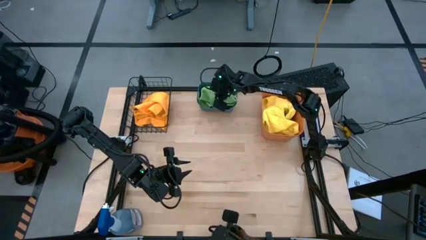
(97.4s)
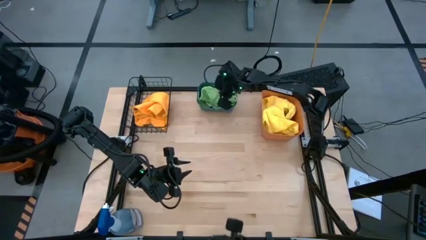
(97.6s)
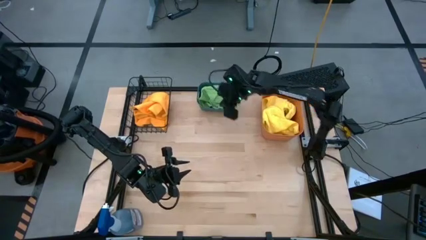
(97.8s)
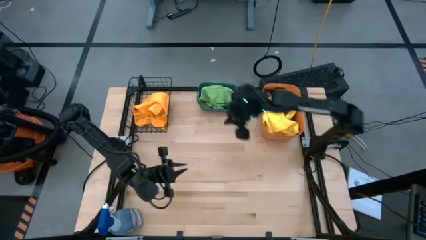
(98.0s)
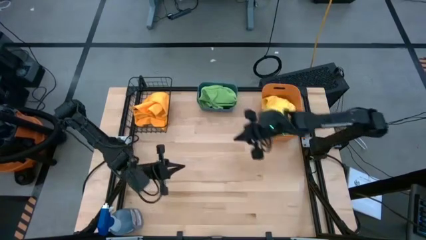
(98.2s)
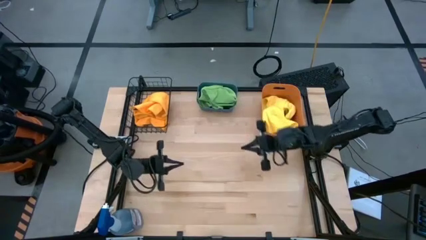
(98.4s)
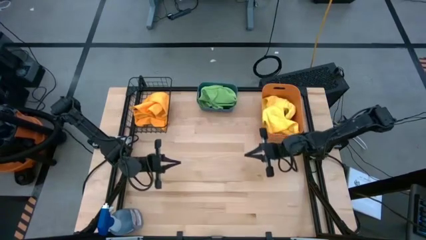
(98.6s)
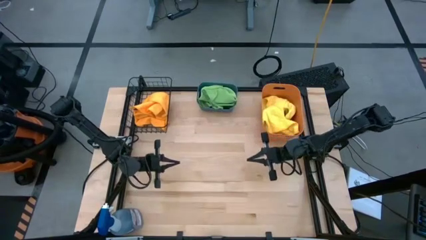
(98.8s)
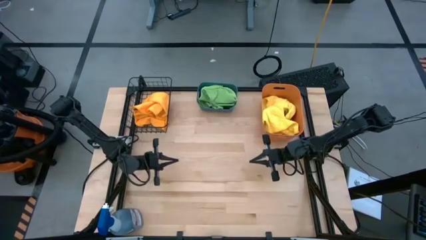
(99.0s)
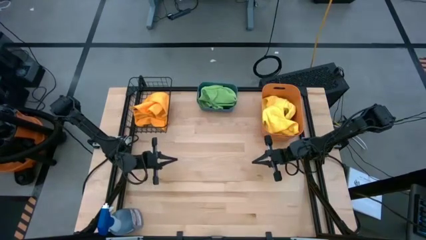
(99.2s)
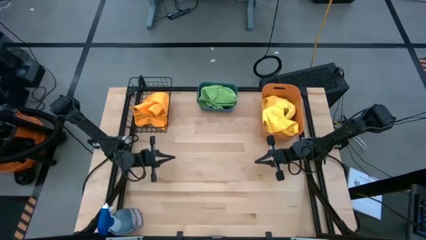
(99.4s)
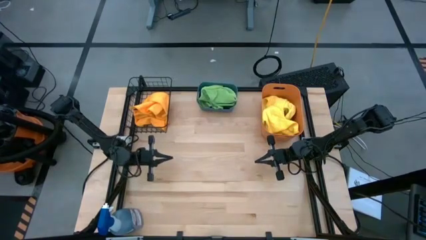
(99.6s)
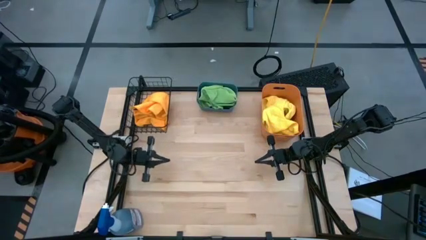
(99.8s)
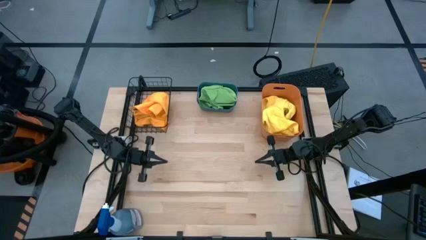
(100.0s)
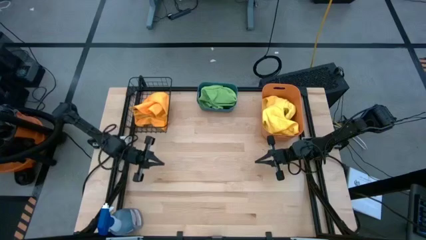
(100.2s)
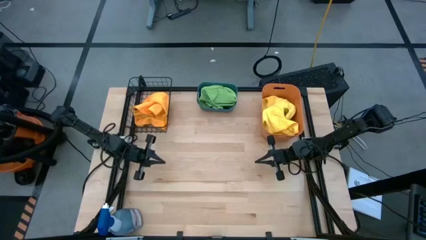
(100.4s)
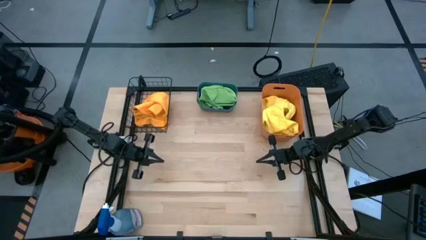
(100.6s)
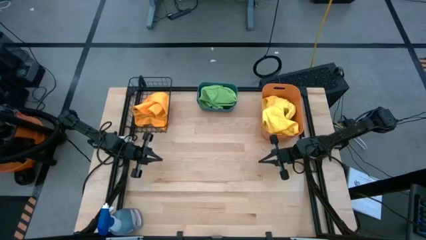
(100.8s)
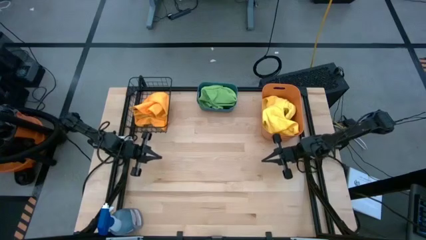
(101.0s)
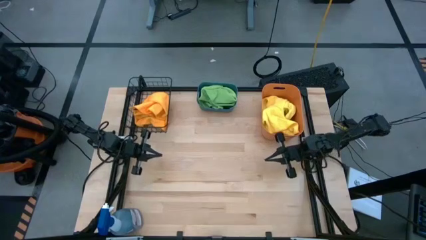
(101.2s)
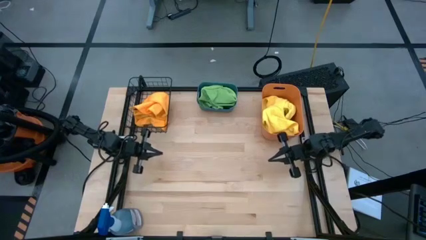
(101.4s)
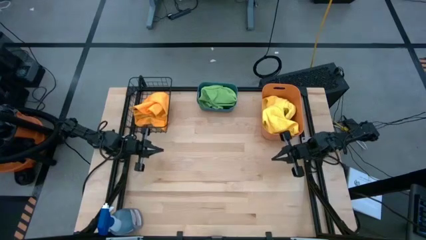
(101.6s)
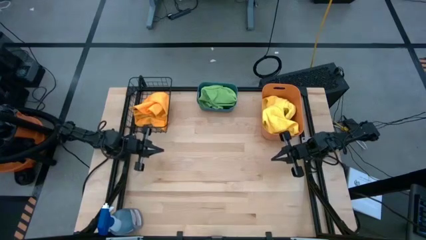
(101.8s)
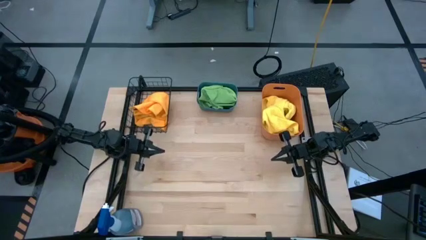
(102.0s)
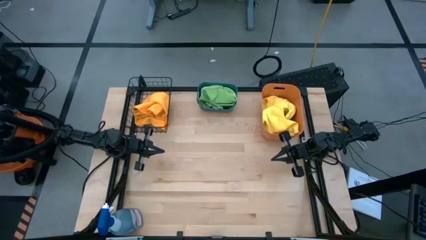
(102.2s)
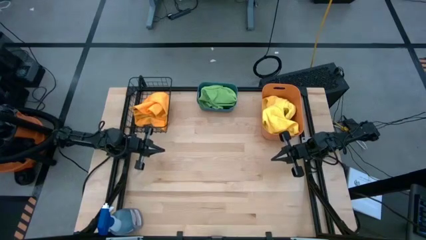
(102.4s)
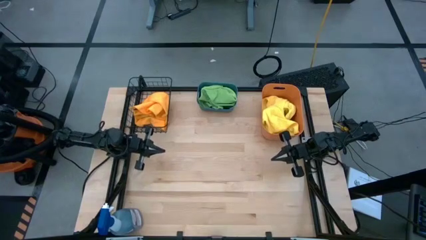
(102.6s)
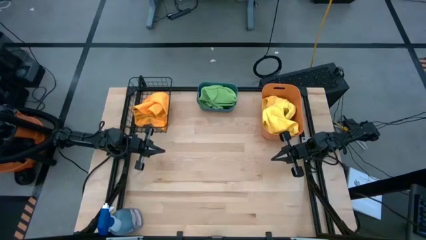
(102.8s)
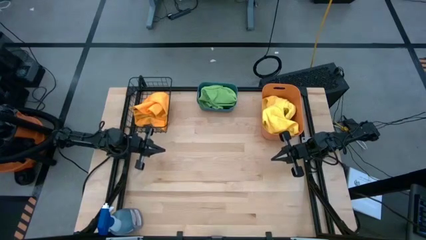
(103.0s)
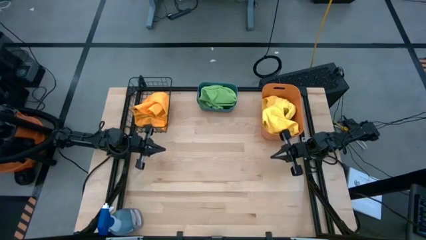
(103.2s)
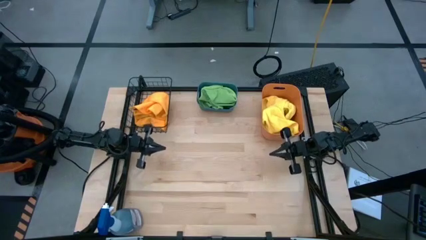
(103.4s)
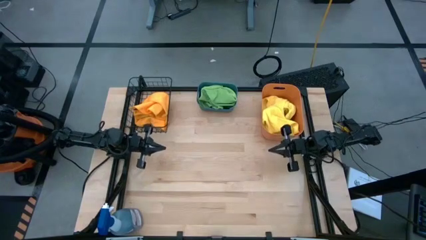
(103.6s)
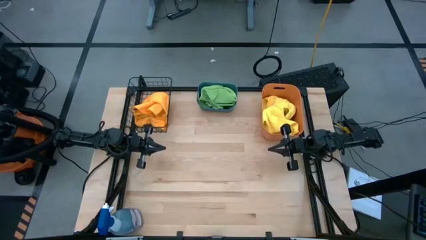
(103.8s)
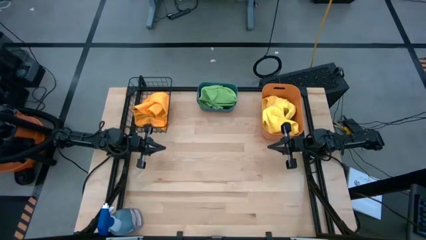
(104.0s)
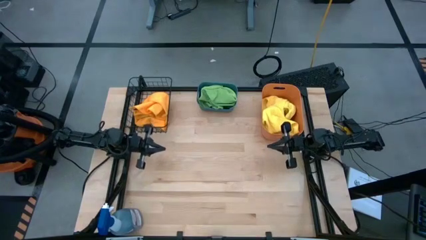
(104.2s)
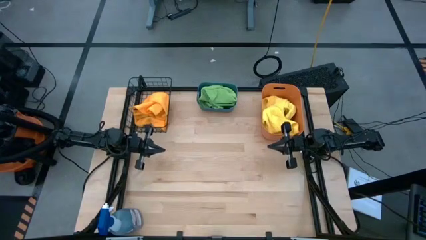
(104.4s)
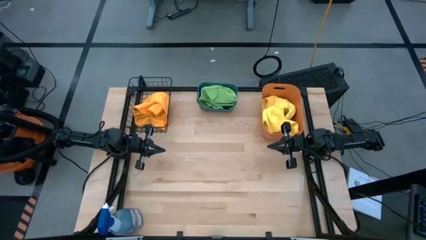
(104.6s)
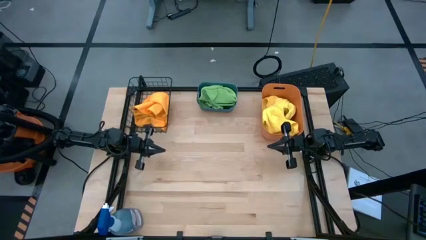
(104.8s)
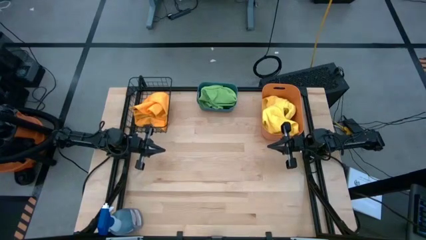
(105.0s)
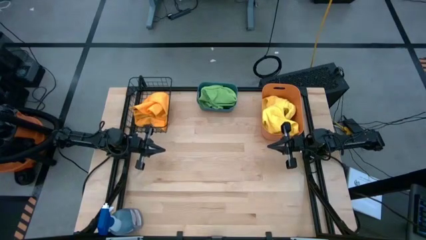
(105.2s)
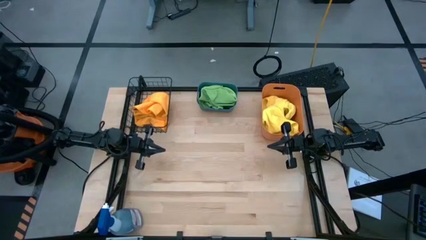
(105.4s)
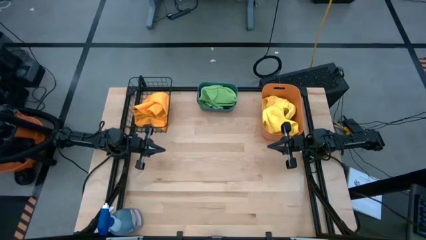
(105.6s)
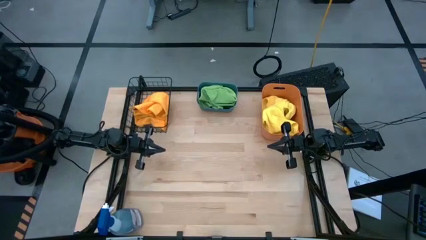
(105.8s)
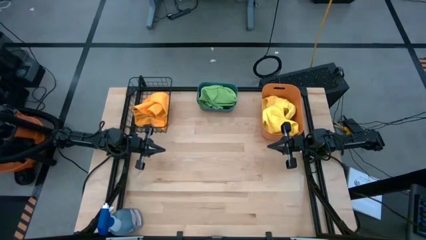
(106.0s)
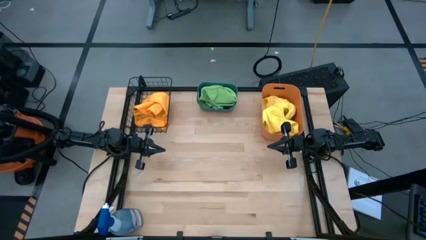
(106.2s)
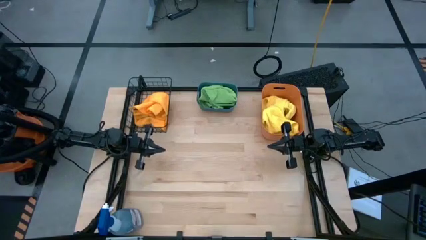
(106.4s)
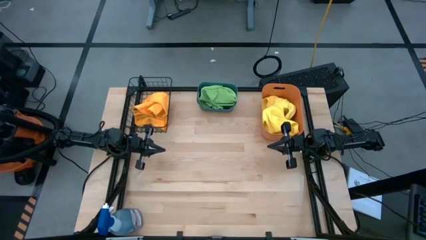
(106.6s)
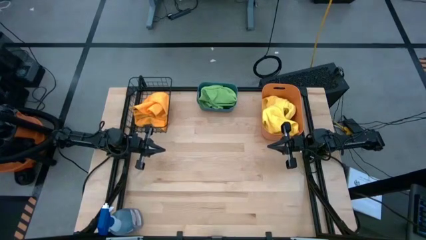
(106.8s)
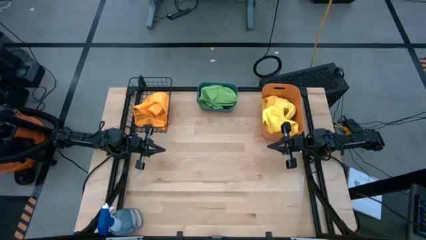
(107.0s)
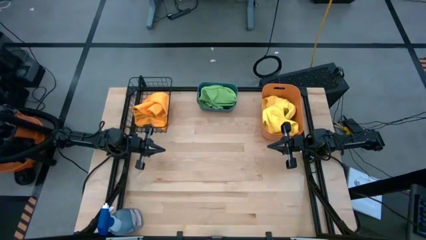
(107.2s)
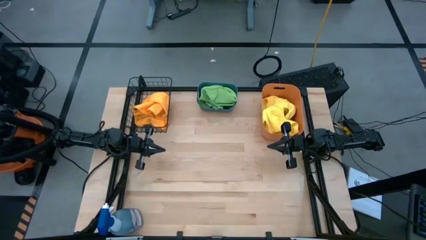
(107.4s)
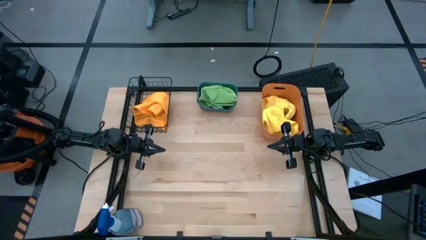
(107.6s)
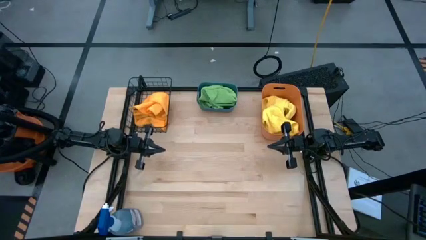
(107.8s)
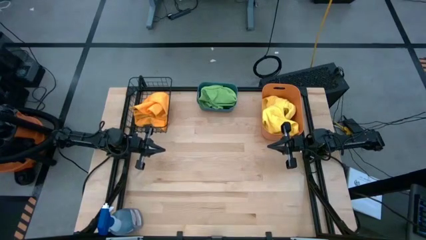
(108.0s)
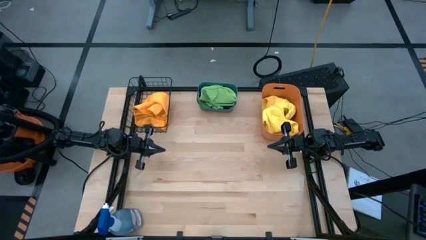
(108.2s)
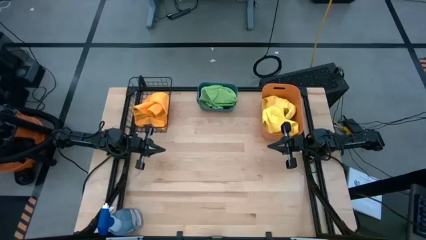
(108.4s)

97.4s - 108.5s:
Task: Sort microfiber towel by color & place in baskets
Return to Home Position

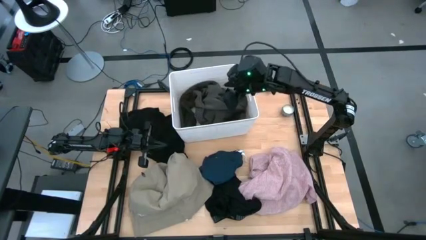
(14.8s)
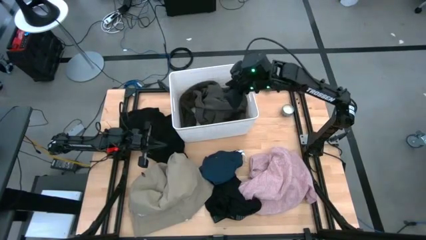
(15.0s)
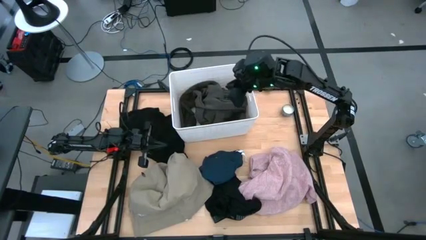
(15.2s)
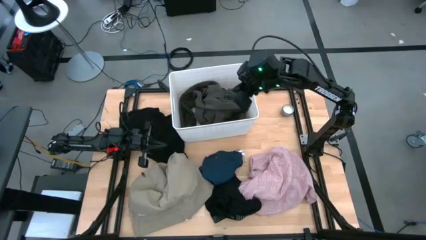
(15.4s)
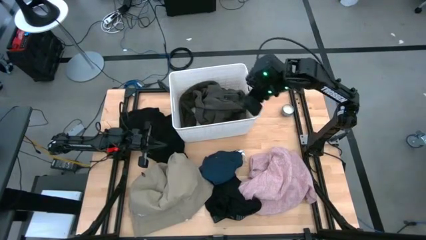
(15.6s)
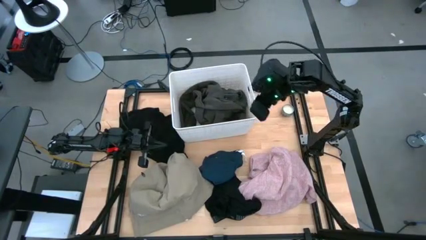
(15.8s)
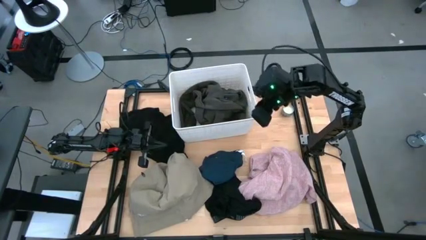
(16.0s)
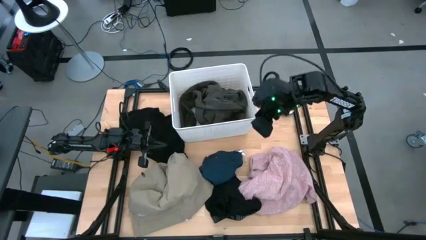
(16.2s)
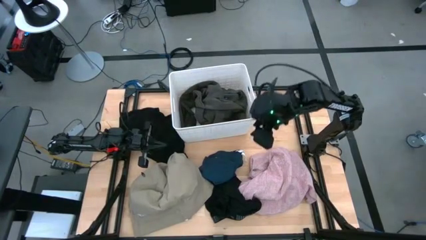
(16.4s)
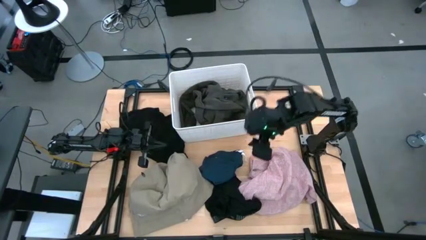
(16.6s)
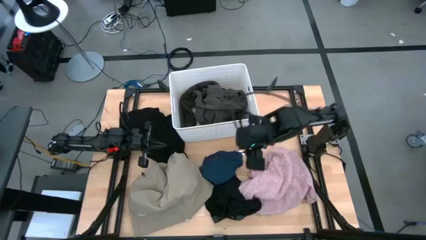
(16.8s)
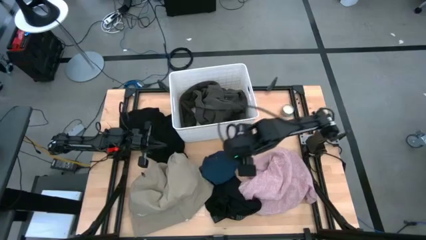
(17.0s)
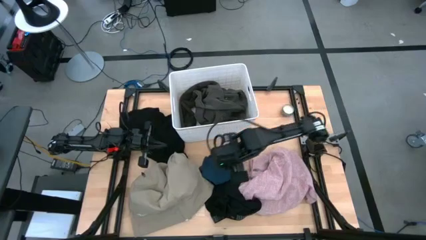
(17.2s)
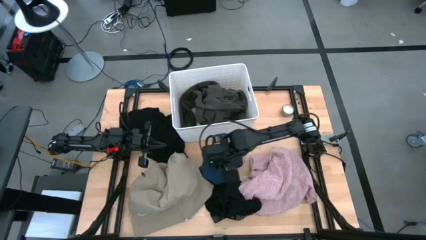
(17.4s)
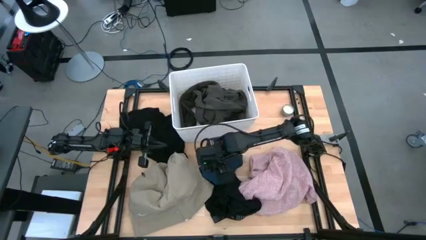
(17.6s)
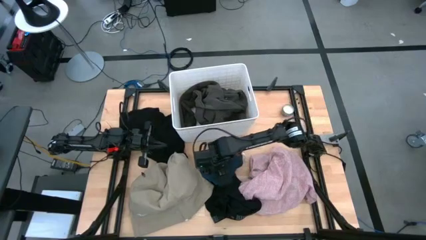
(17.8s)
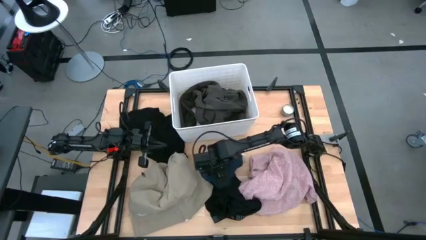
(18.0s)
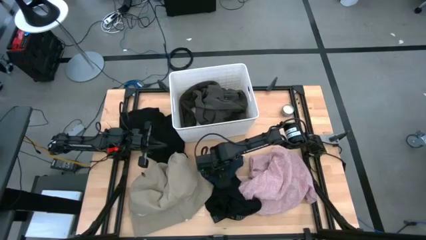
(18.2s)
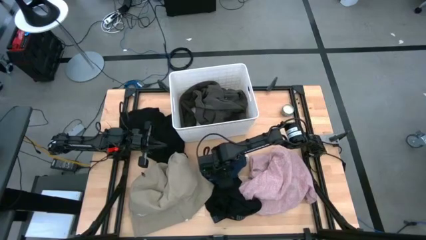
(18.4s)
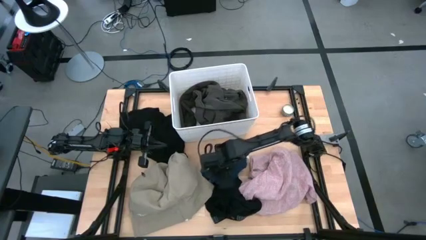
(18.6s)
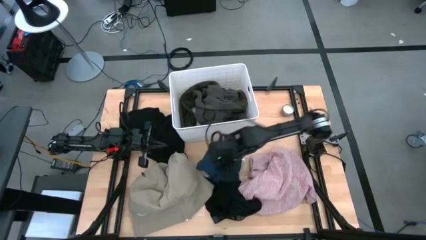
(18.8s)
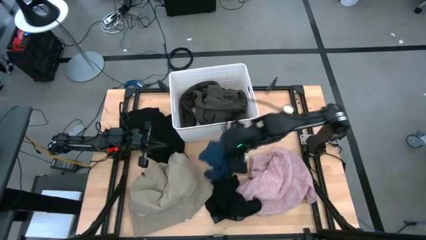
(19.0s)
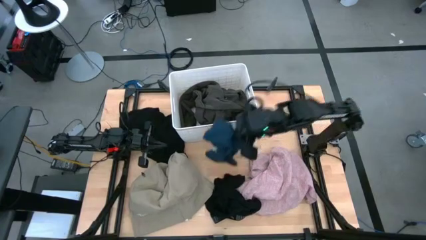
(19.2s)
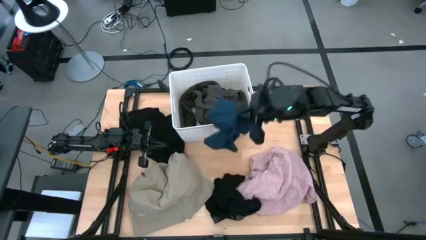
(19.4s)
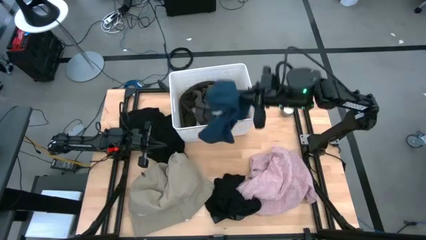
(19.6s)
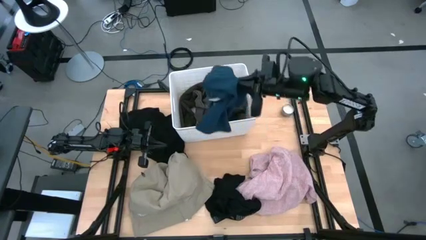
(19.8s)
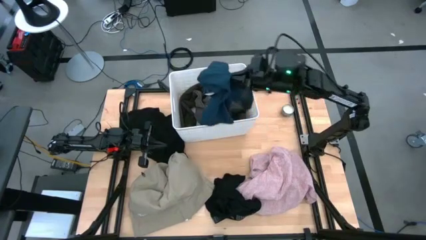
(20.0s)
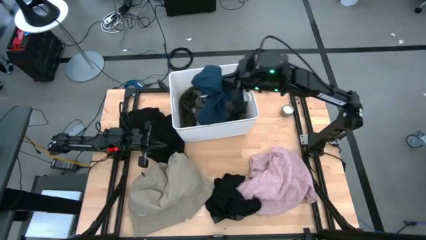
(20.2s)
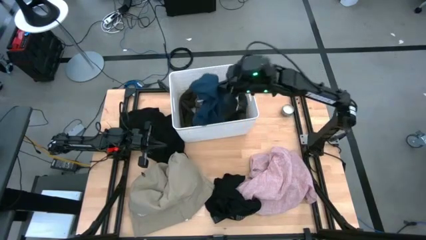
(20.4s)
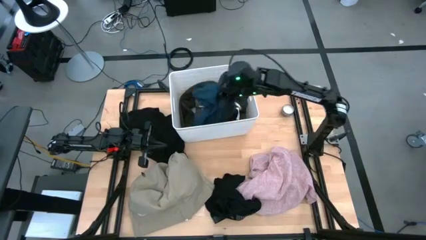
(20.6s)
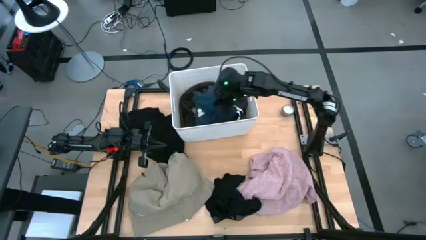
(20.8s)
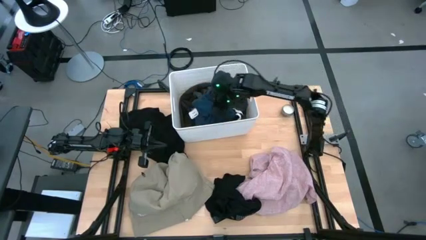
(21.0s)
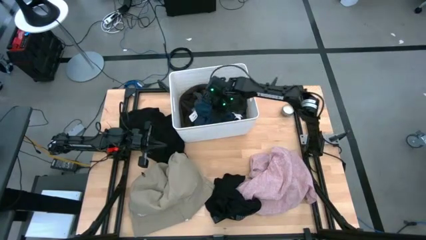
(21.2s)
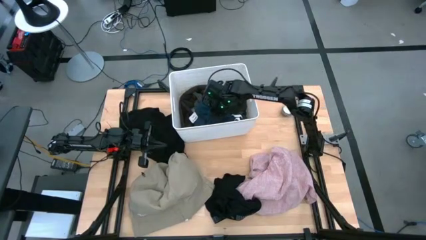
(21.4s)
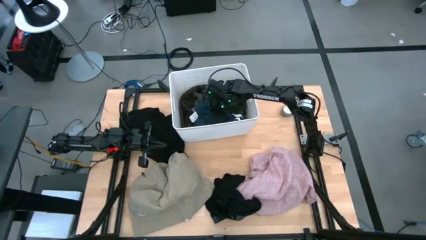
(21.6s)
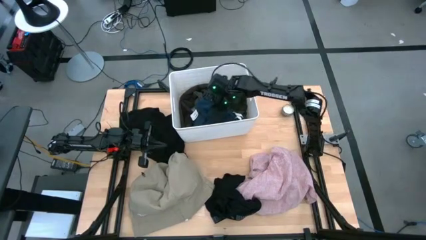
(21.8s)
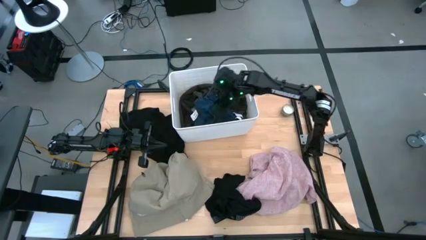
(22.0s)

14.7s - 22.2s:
Task: Sort clothes
Put the blue shorts into the white laundry bin
